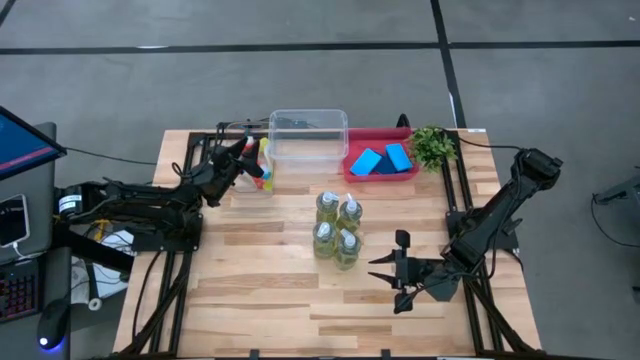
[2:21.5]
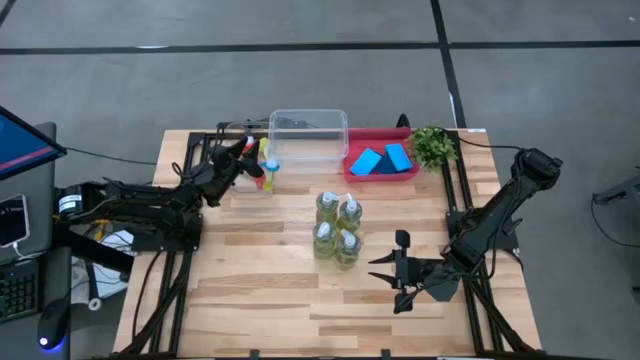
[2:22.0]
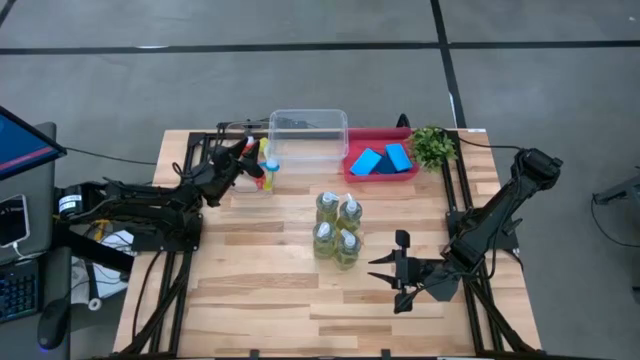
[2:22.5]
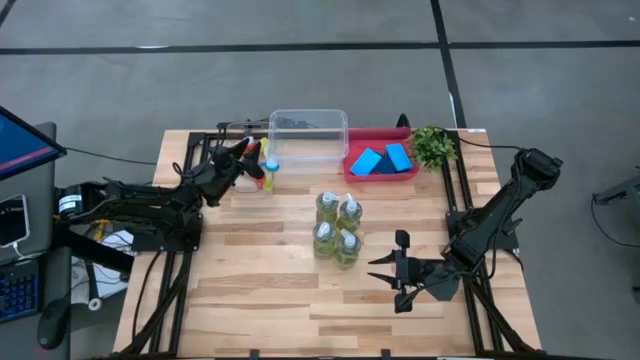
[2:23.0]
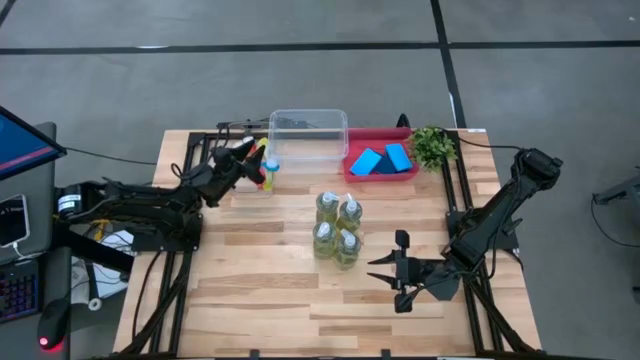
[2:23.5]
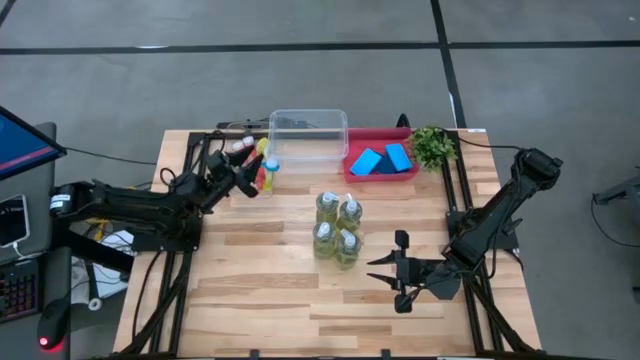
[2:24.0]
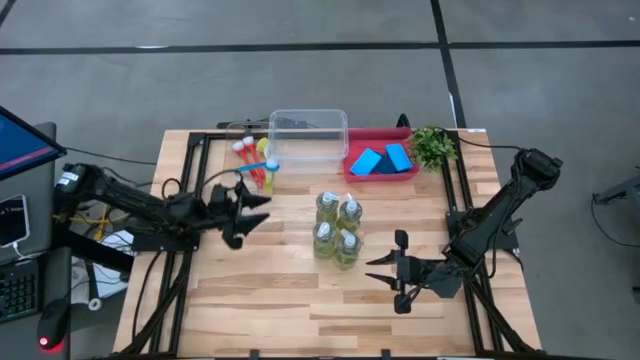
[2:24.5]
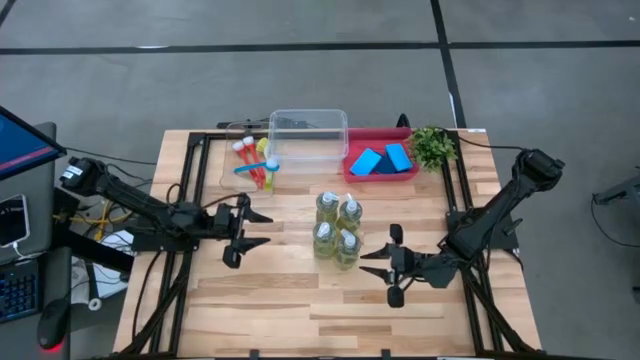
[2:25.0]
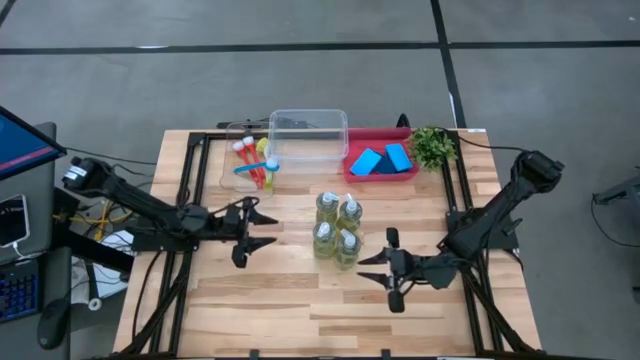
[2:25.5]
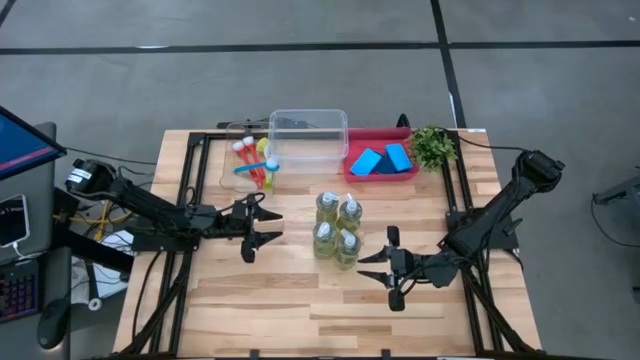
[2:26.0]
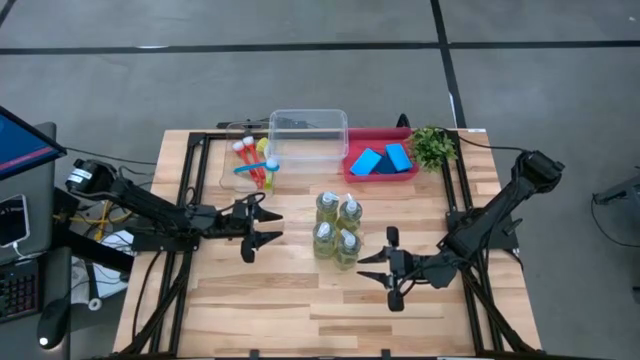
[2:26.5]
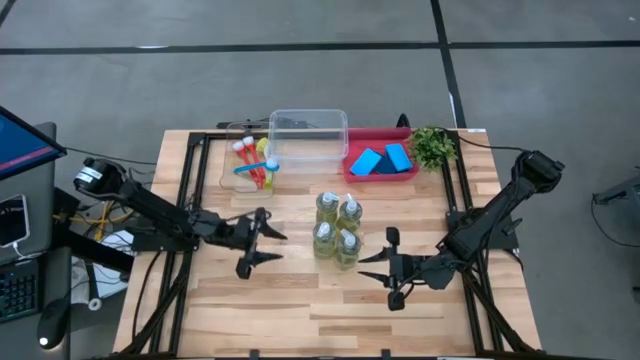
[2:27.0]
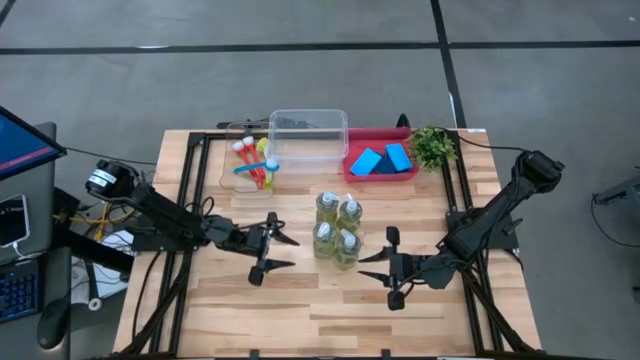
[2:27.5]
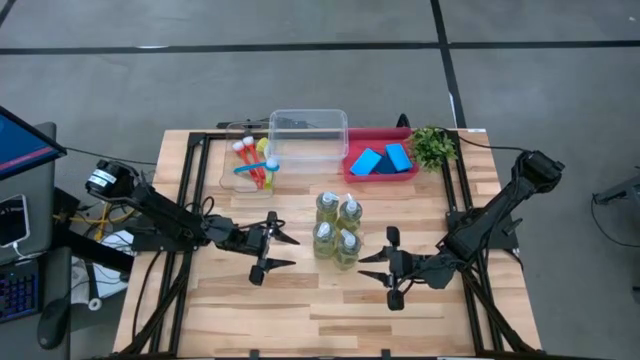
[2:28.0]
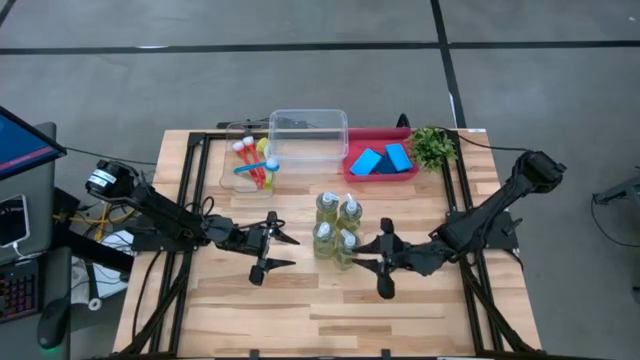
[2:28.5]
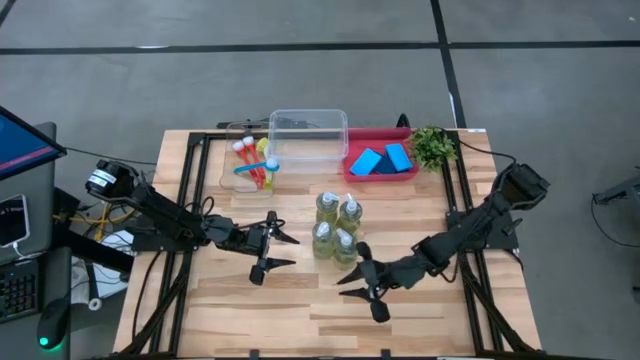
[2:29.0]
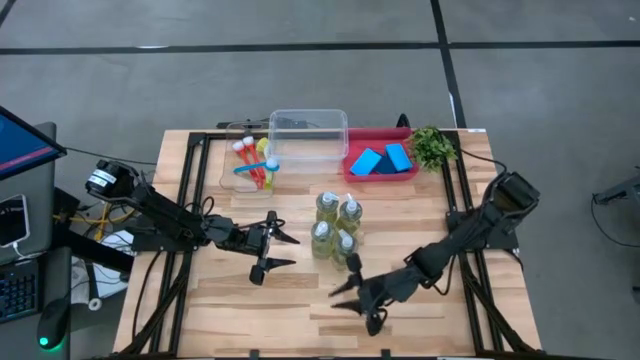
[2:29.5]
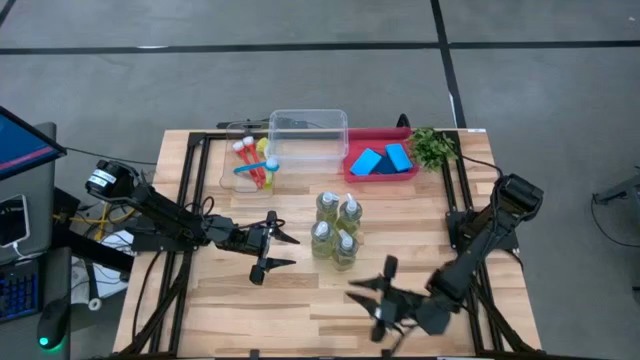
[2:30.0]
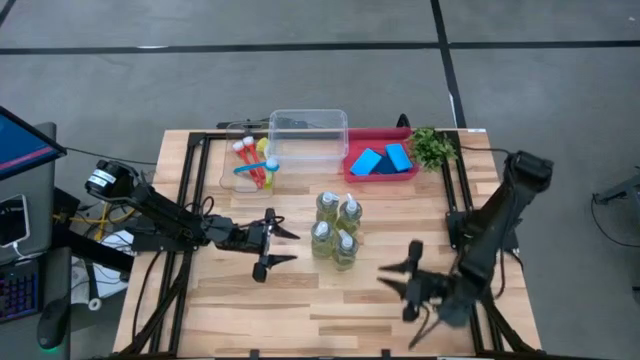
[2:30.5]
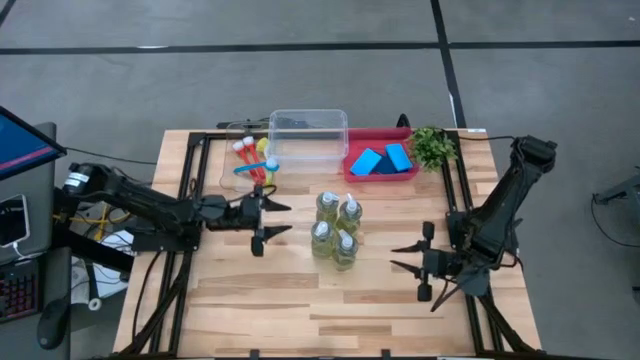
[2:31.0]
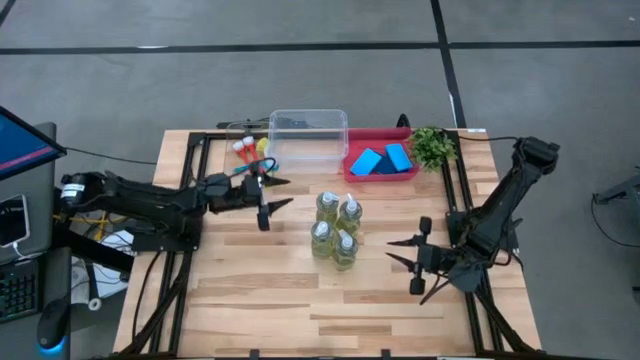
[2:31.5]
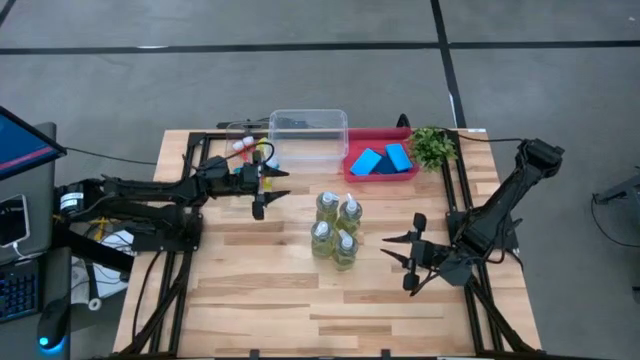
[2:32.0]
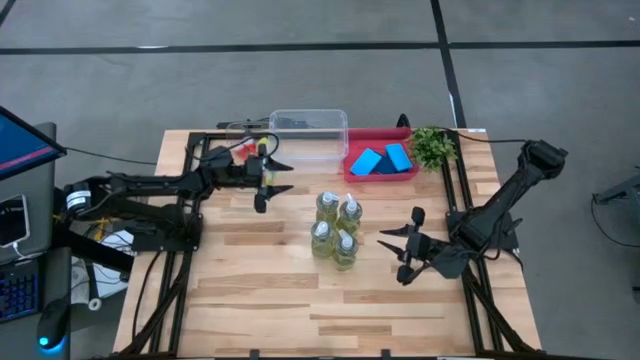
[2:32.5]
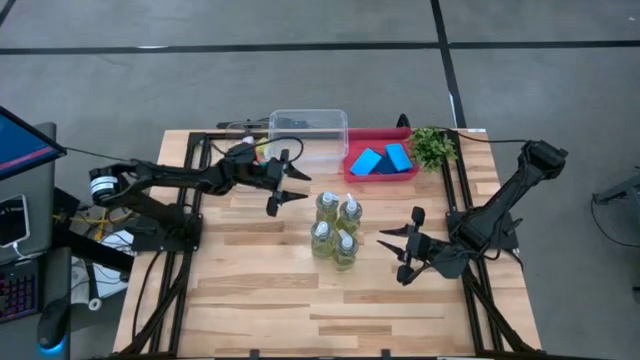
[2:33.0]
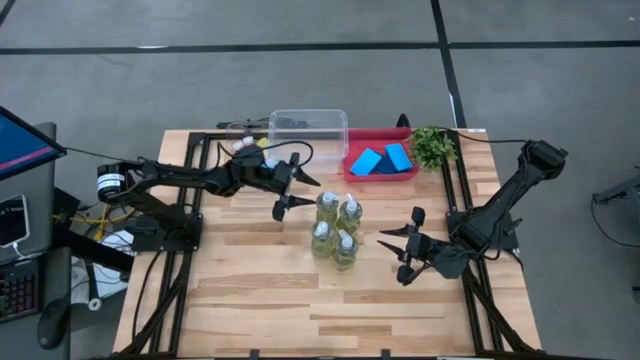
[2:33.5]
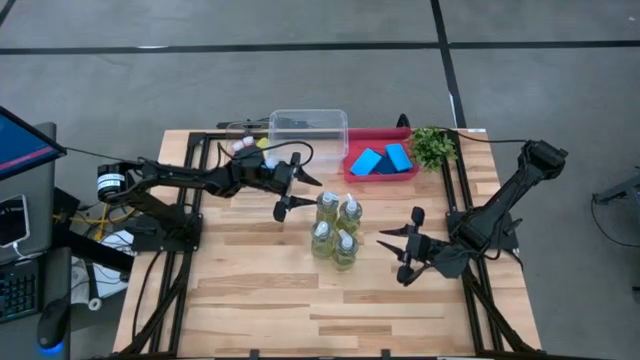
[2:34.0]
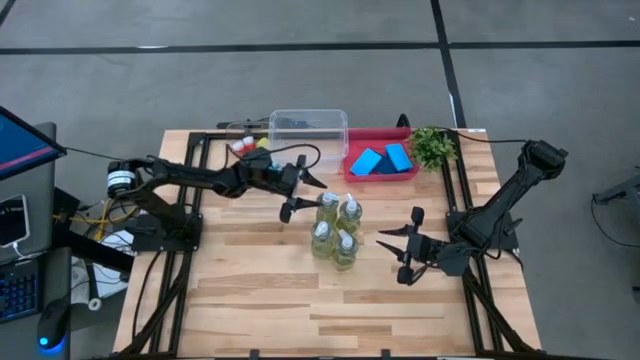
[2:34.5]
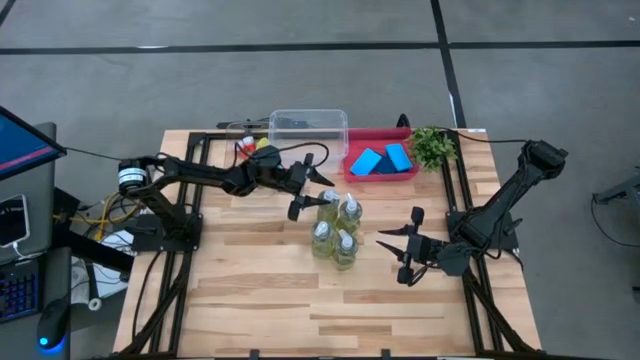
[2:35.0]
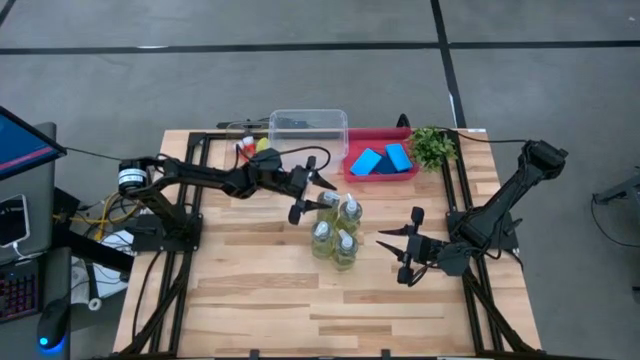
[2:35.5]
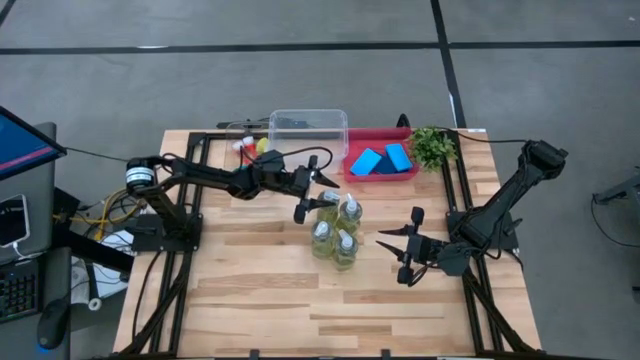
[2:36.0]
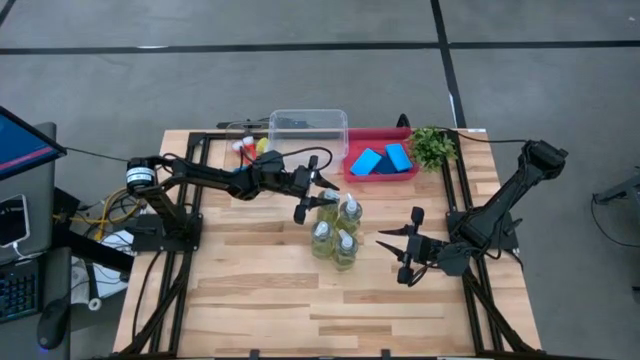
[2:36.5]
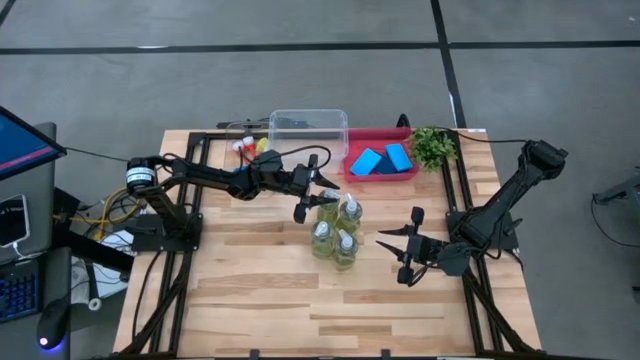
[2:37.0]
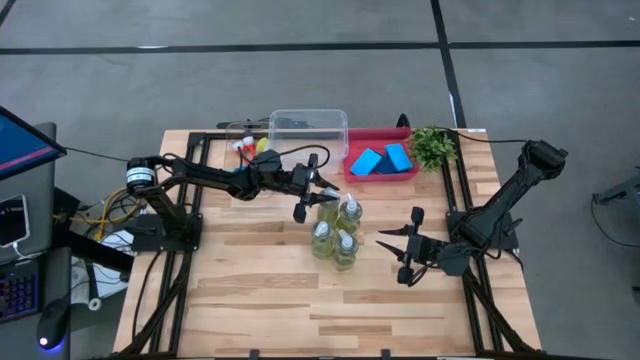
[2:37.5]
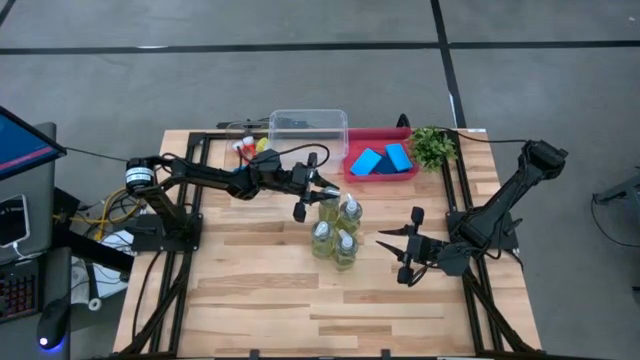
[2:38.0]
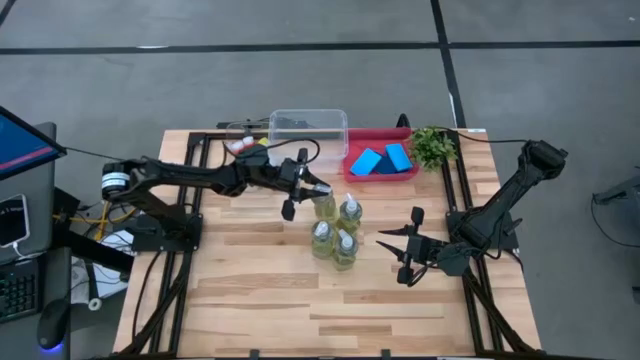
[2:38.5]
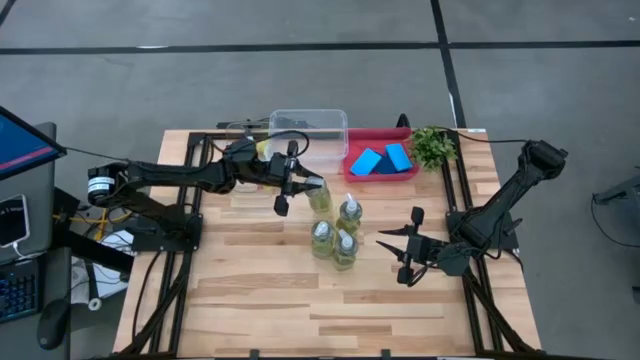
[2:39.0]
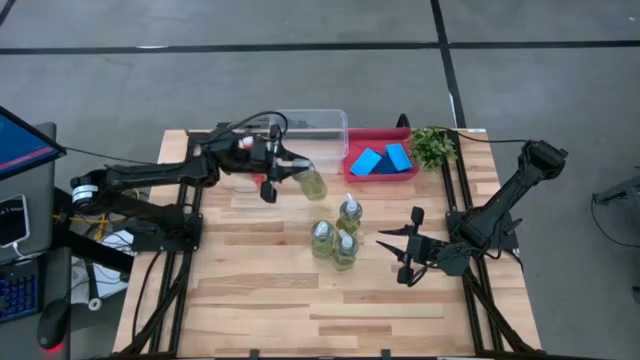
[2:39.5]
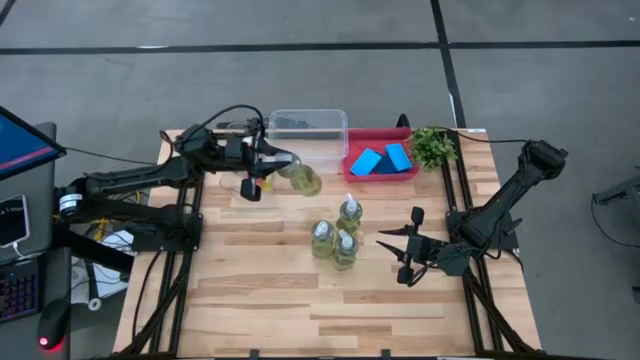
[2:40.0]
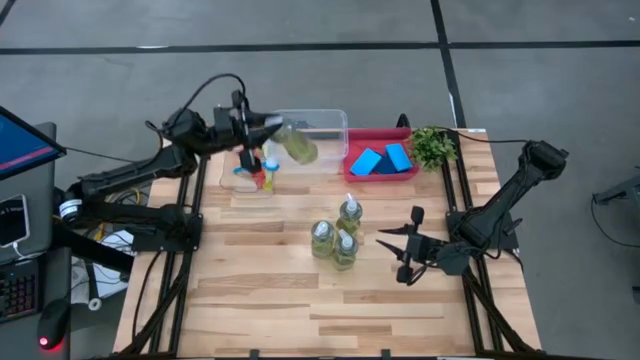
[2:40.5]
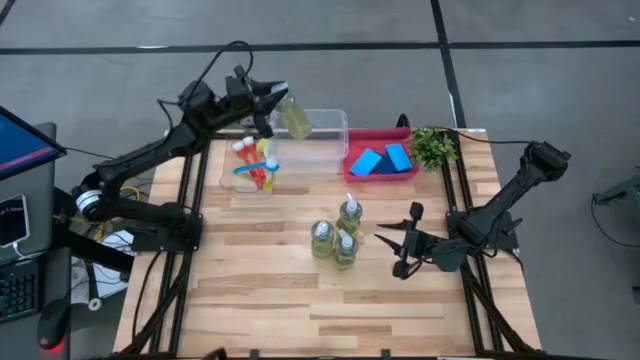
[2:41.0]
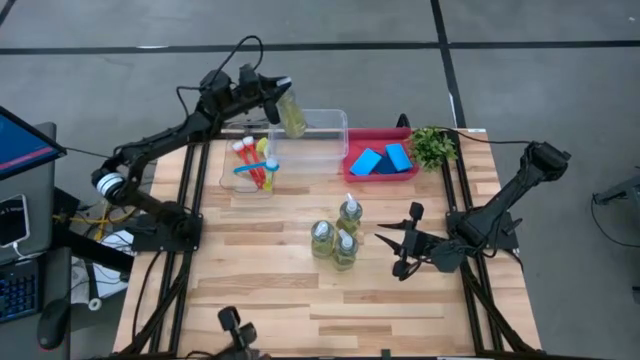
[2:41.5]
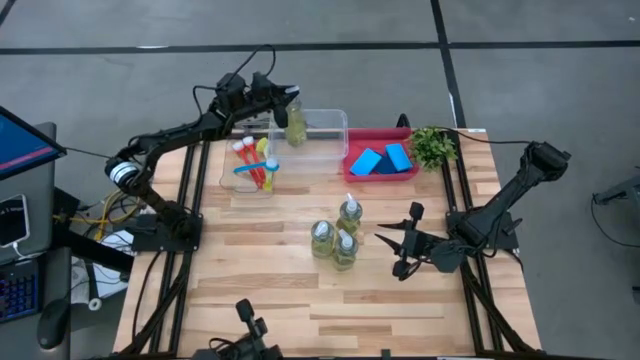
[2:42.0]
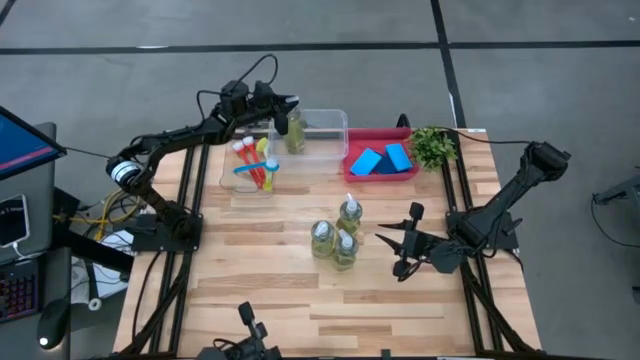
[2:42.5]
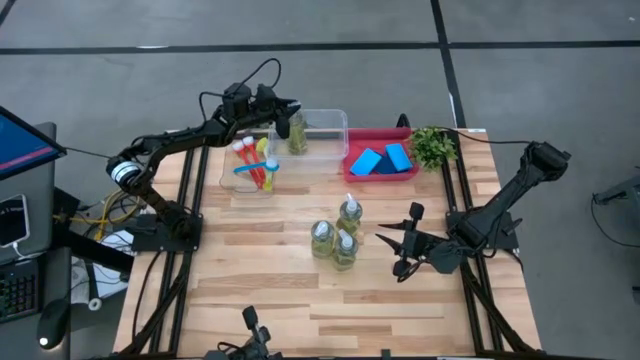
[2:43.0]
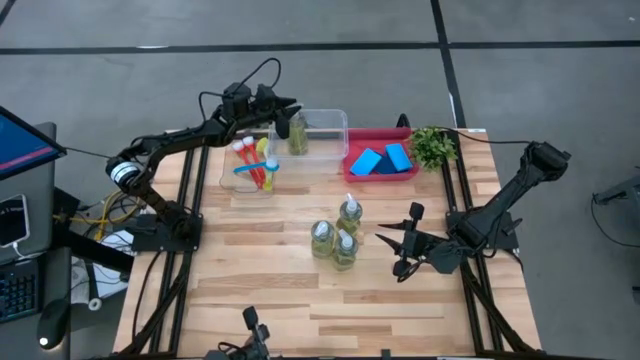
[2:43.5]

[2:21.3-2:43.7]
Task: Pick & Place Kitchen Sink Supplies
Put the yellow dishwashing liquid dispenser bottle into the right transparent bin
